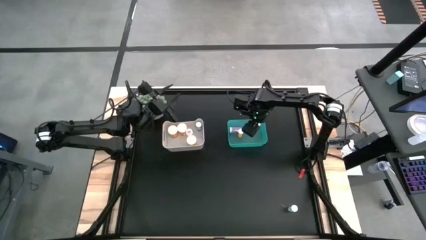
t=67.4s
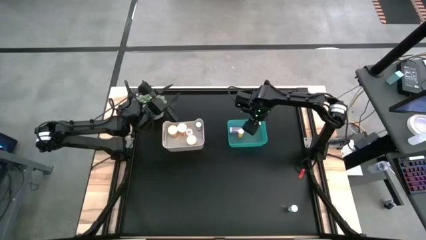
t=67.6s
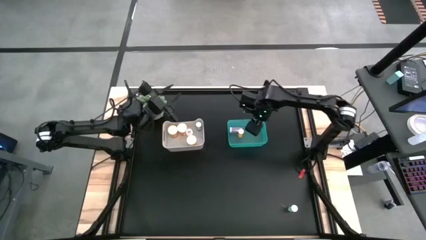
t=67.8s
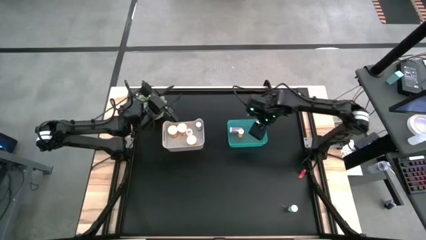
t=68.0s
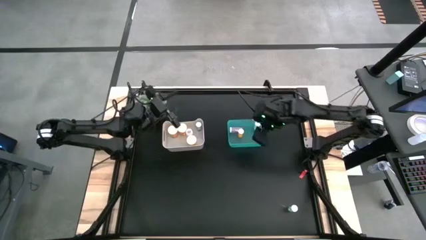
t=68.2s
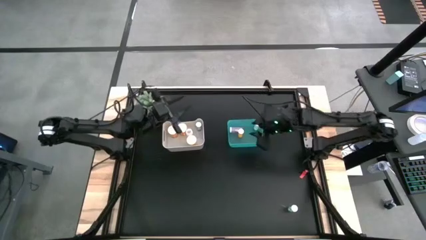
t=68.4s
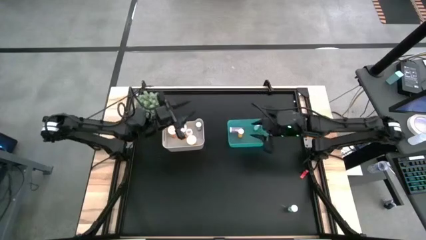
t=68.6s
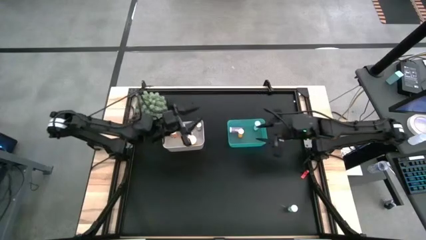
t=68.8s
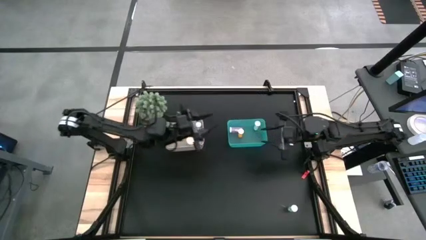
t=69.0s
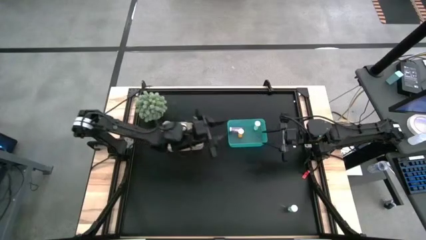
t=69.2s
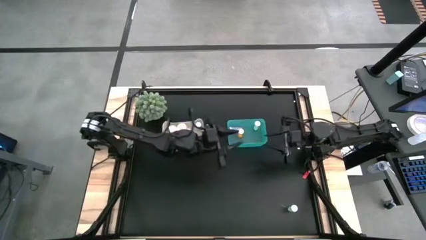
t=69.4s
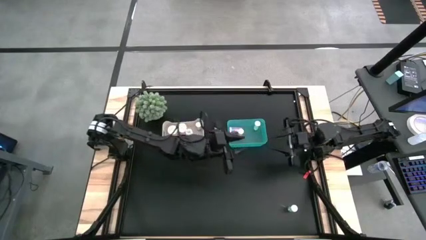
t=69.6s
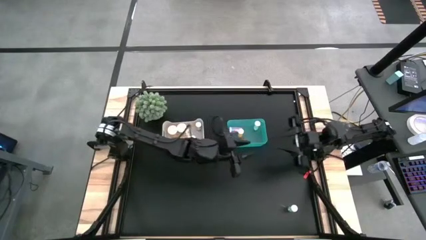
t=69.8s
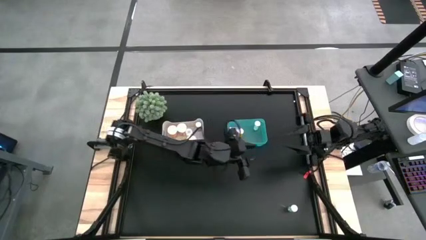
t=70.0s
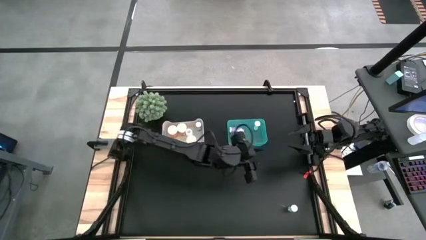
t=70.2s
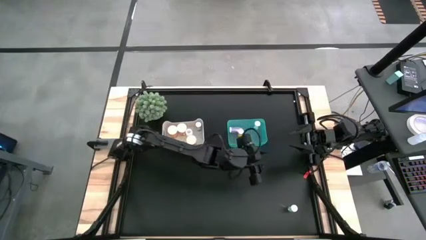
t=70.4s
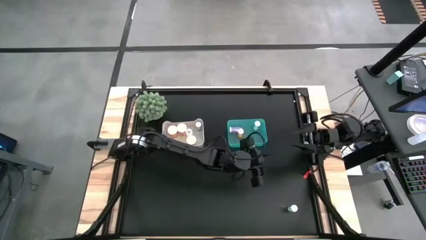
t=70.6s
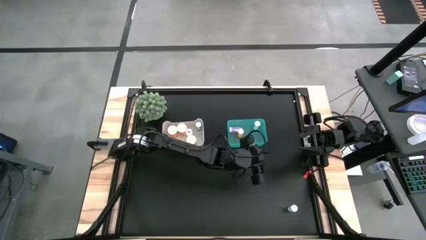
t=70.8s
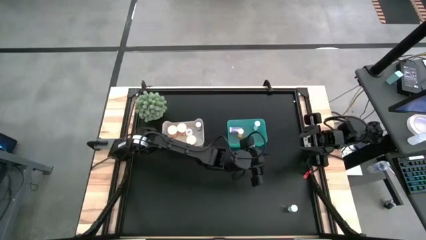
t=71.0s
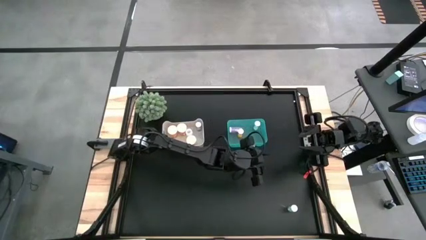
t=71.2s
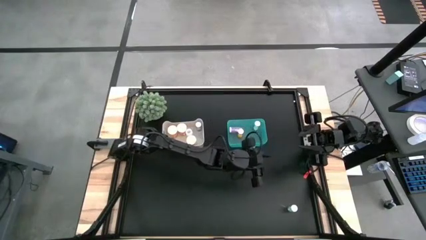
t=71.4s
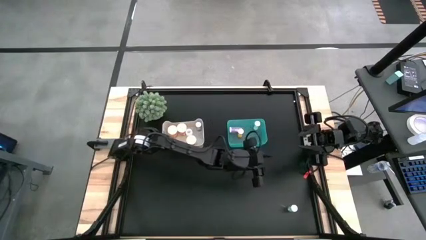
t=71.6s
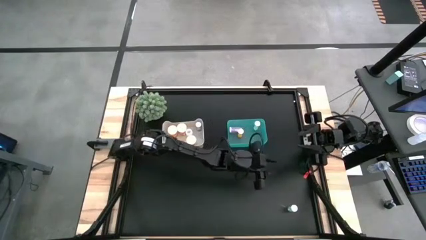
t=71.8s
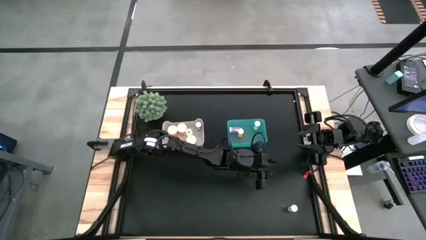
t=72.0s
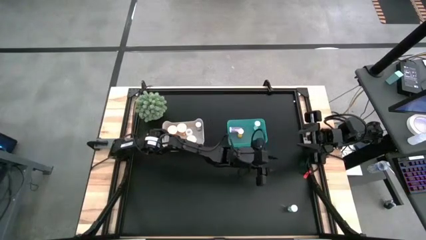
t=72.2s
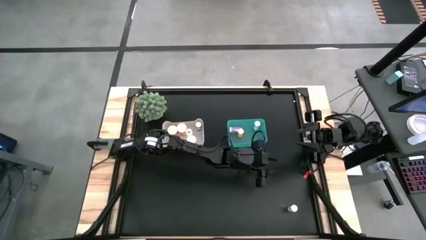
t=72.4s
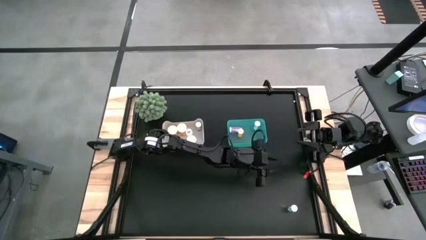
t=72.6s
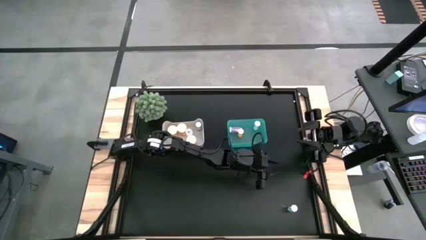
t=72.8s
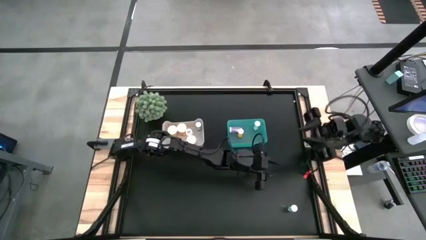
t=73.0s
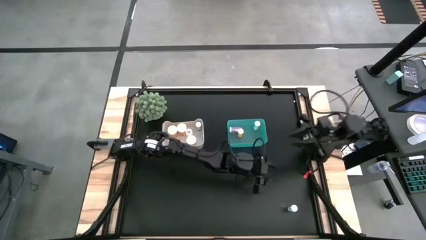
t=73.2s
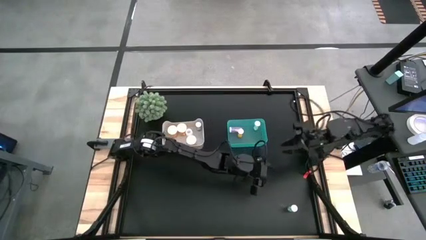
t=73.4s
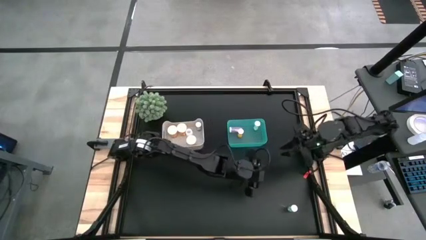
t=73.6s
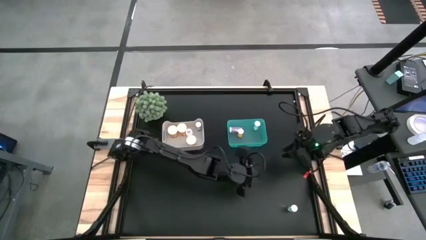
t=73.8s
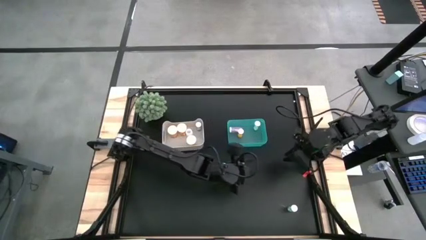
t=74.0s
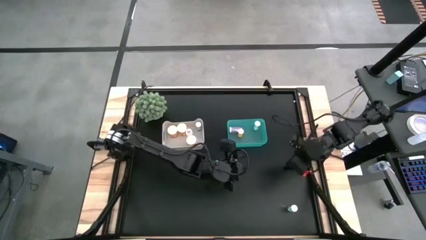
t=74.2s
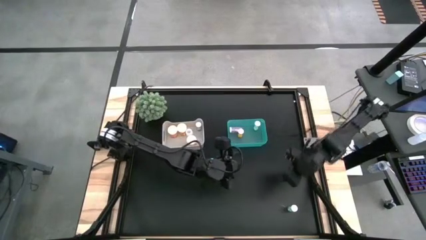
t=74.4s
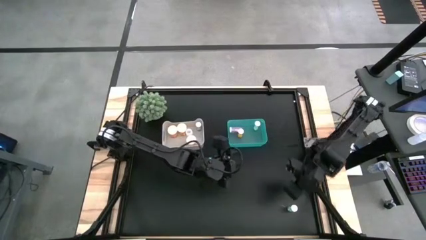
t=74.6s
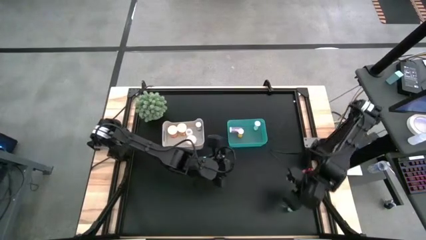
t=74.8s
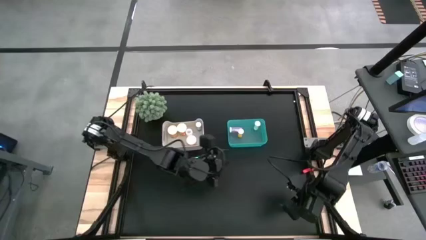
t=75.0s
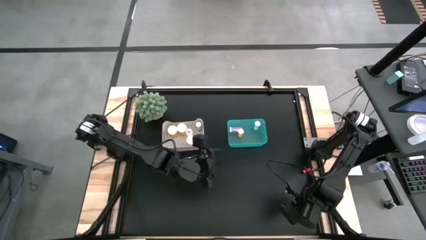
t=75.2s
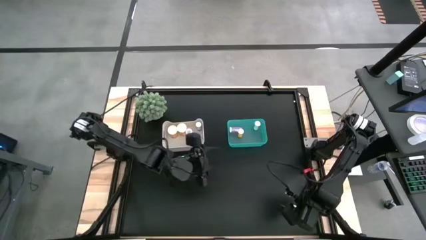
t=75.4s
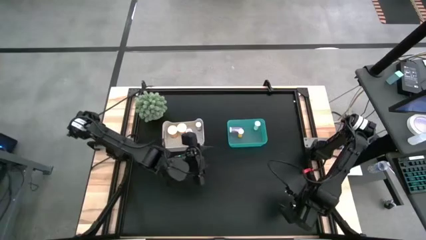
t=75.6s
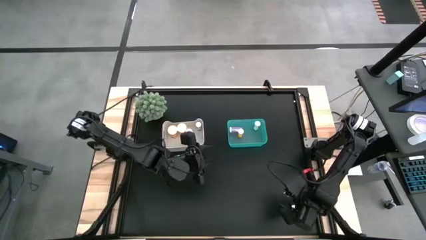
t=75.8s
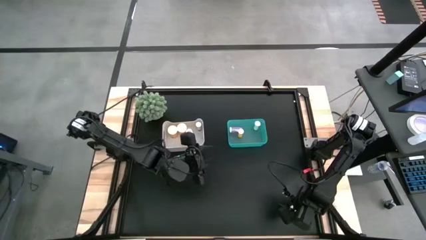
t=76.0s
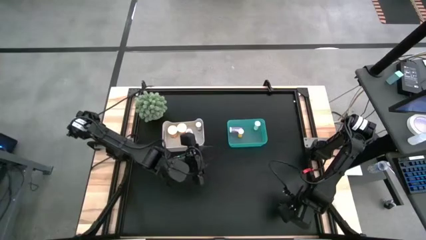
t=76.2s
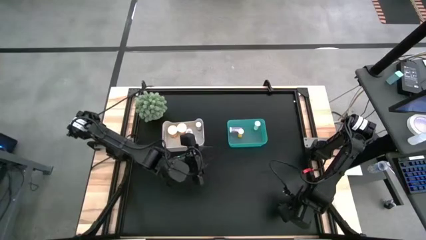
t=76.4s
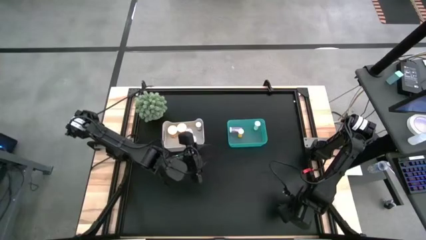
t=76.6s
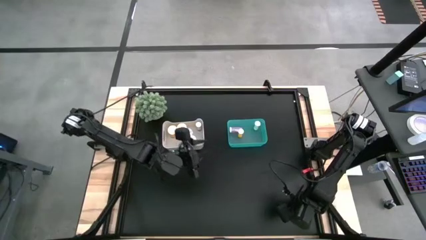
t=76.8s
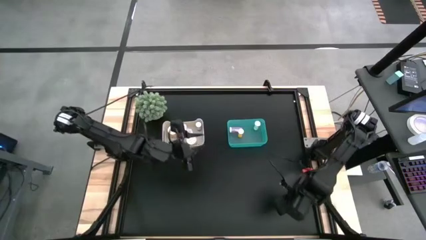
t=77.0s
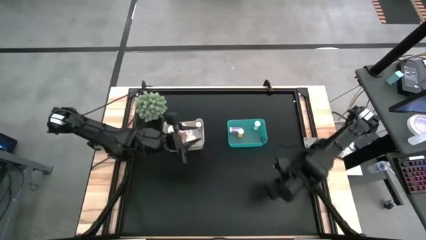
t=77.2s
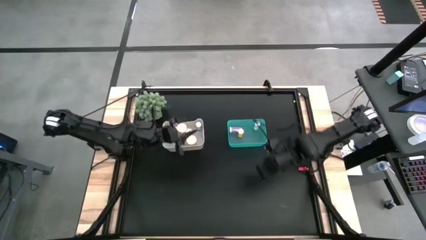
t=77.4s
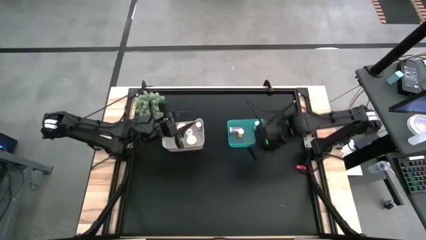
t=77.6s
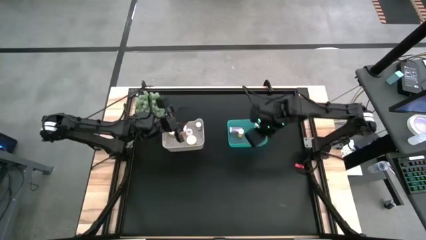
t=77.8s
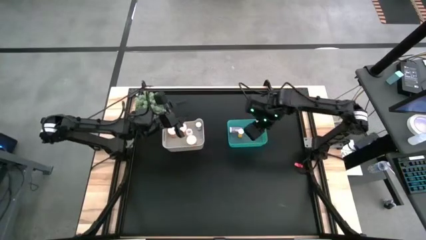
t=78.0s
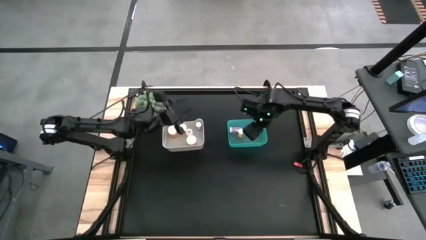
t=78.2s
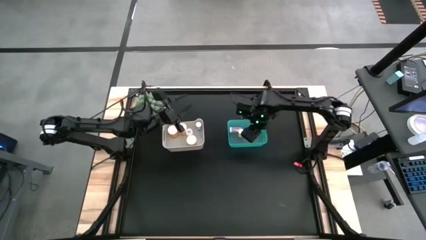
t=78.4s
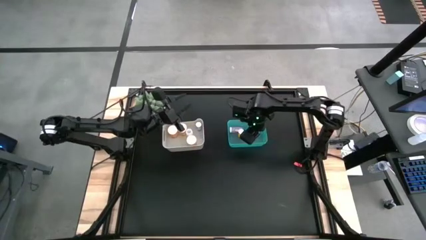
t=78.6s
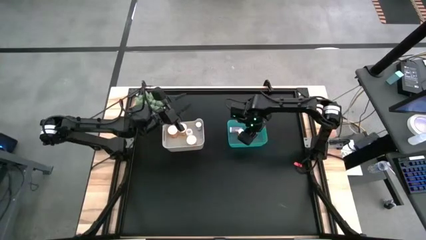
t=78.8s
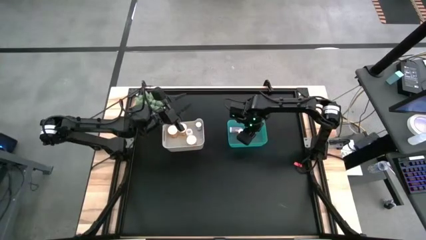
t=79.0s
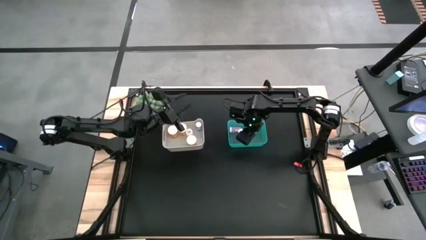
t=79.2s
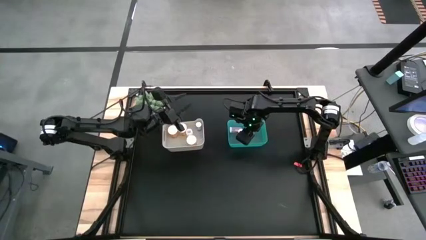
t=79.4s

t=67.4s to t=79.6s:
Task: Pick and place medicine bottles into bin by pill shape (circle, oval)
Put the small green tablet bottle into the green bin

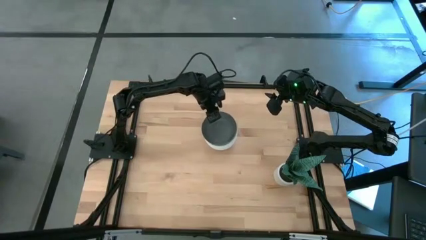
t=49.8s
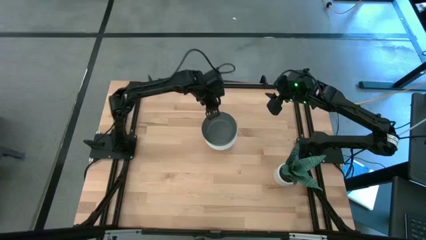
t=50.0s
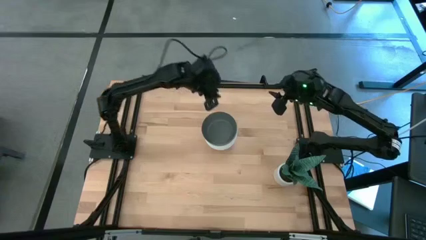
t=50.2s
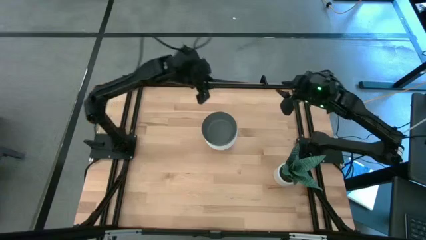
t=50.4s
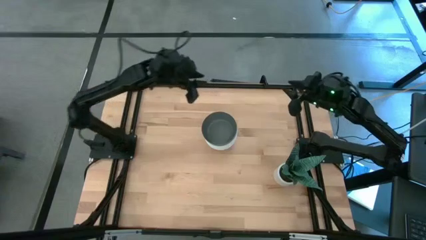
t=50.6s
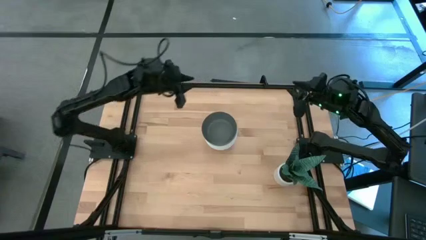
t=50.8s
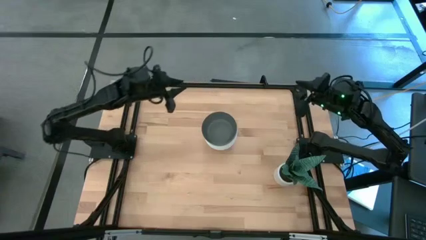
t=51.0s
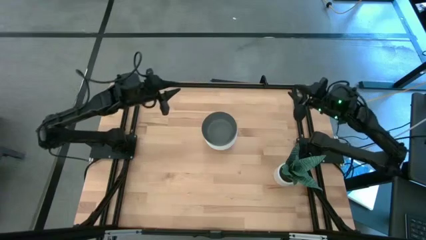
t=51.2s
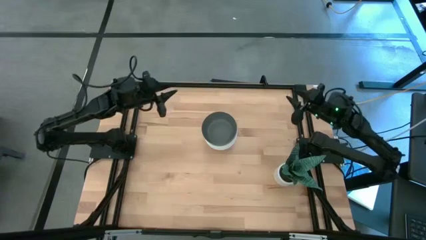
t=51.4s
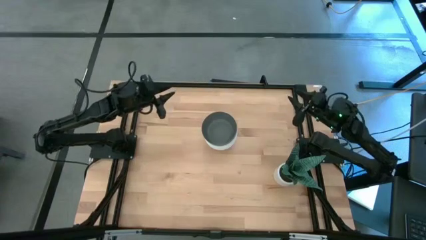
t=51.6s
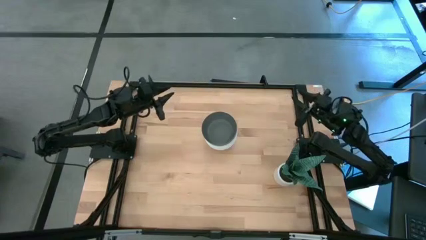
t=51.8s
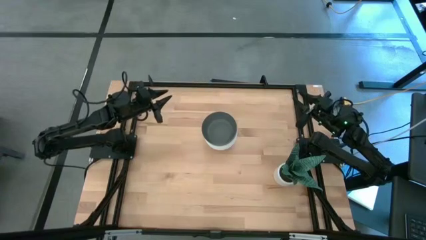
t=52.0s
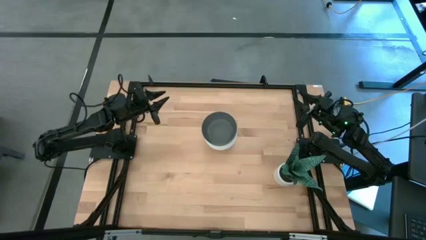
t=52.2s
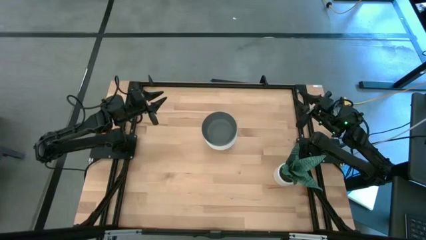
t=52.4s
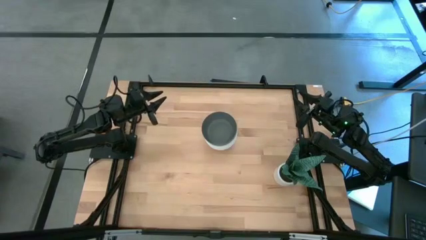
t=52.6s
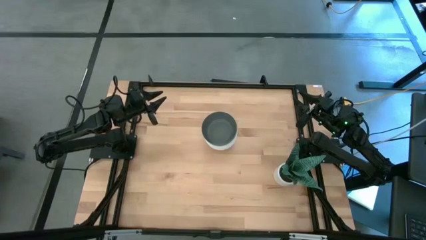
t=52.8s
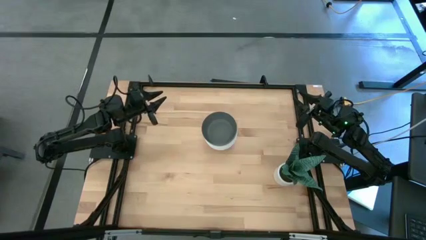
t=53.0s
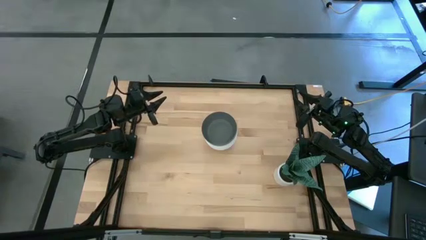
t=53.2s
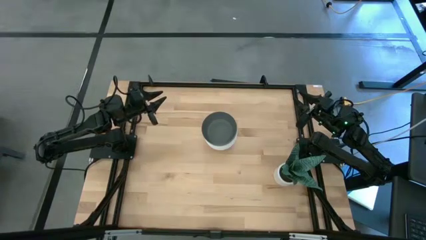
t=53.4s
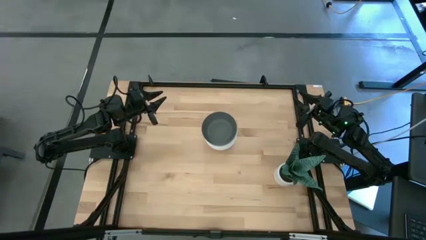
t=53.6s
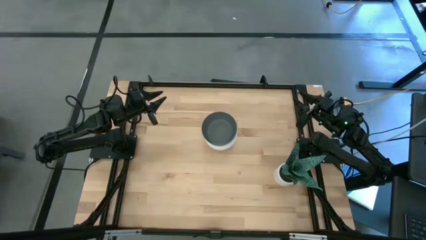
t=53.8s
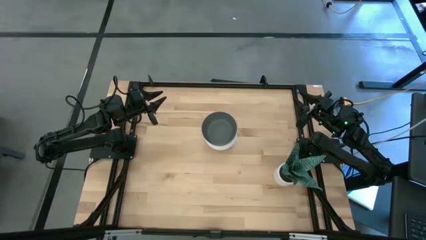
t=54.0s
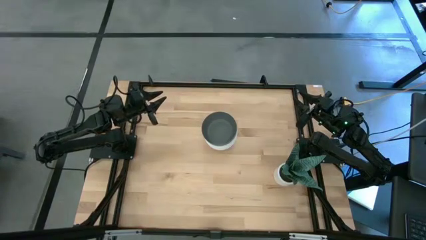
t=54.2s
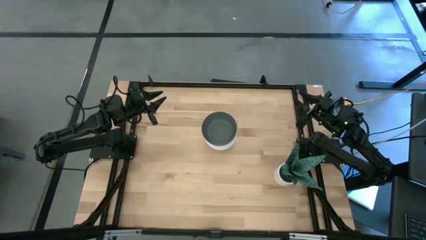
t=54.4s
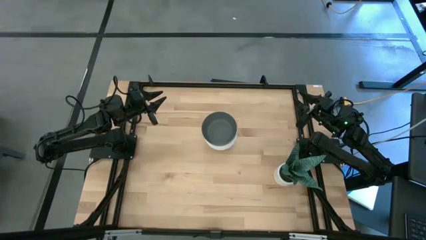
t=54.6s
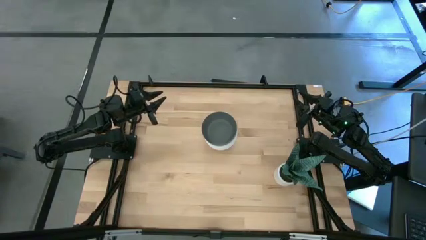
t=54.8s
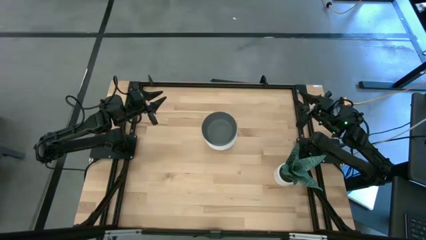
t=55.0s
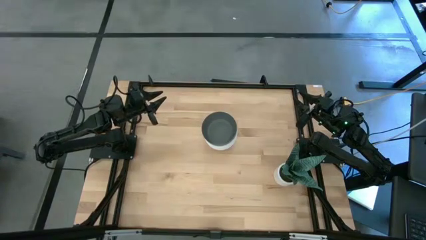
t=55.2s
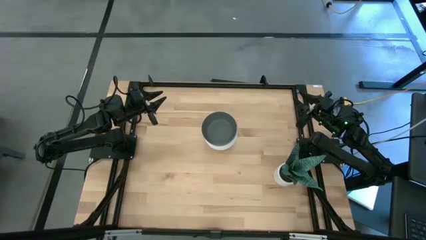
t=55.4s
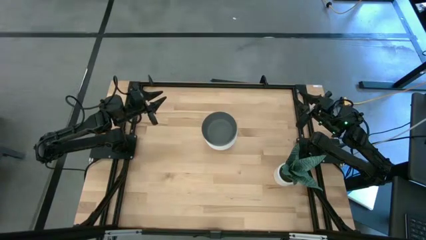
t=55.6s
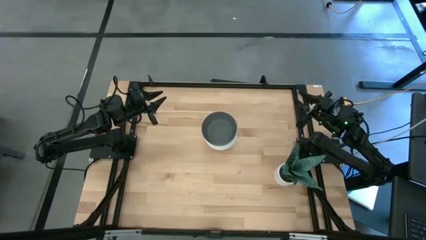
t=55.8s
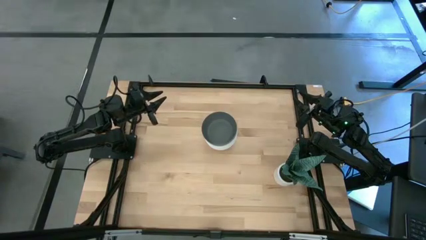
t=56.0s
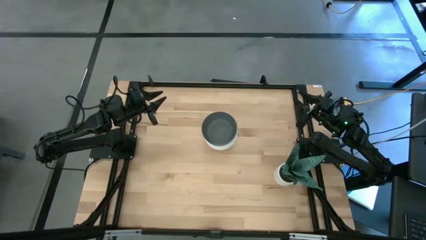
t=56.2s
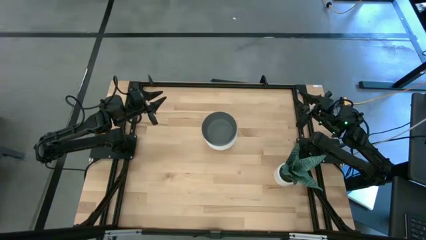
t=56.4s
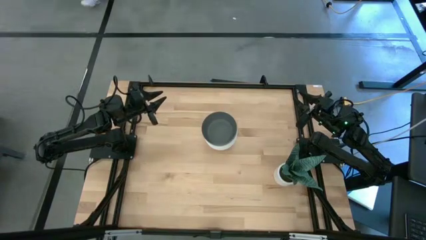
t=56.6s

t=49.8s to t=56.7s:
Task: Nest bowls inside each other
Return to Home Position
